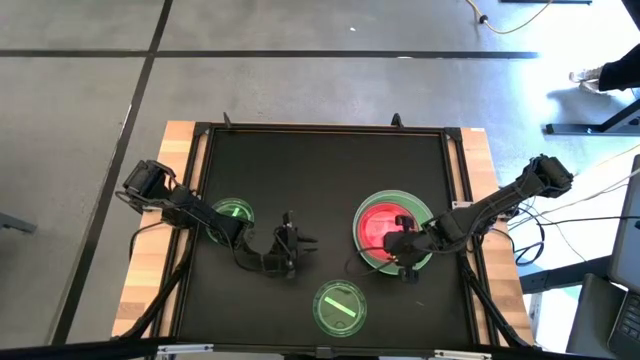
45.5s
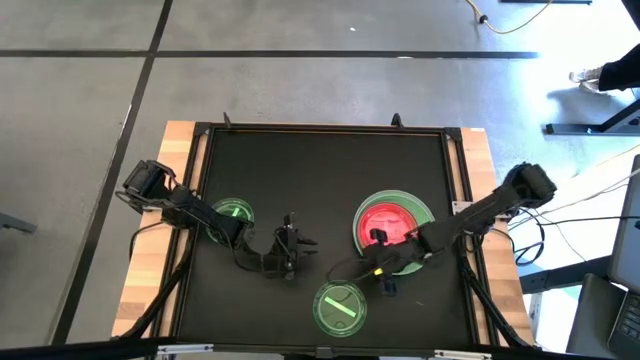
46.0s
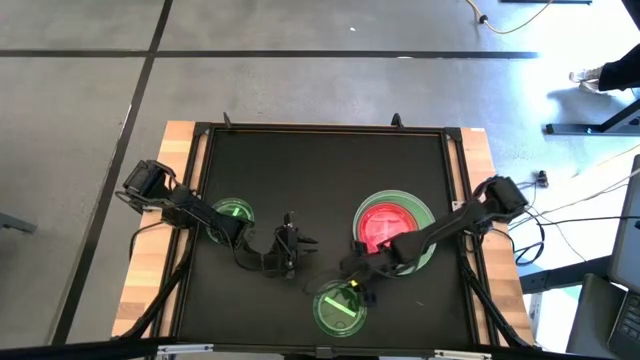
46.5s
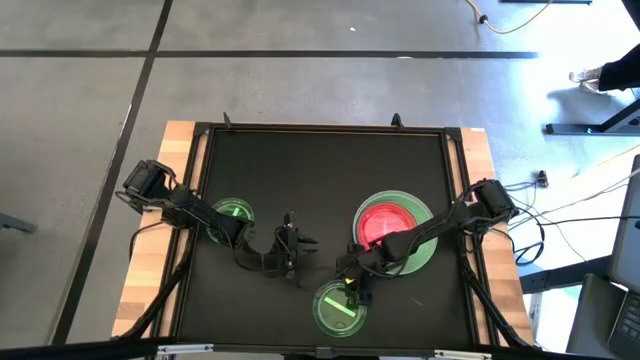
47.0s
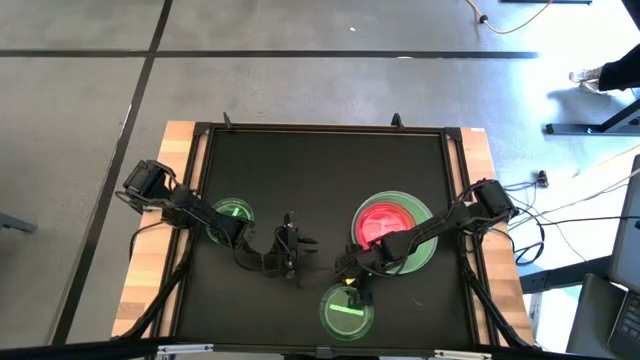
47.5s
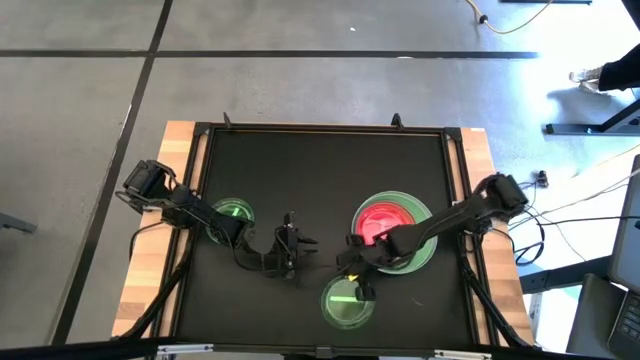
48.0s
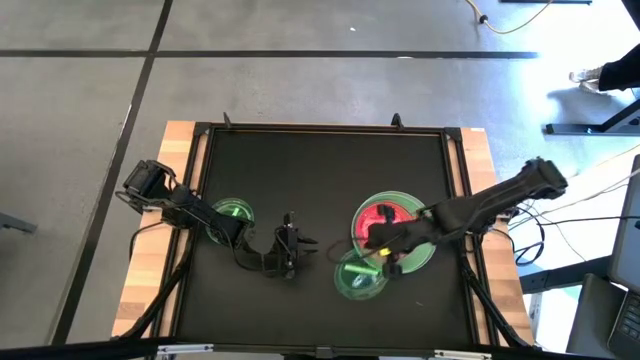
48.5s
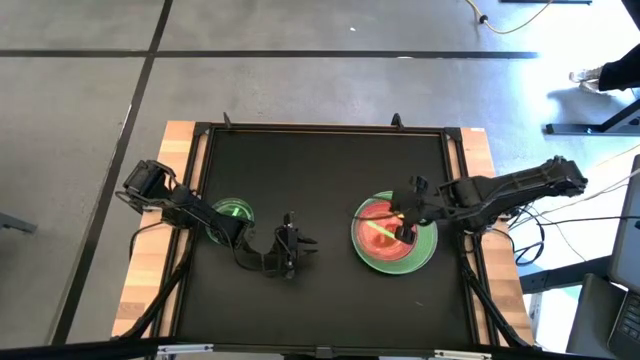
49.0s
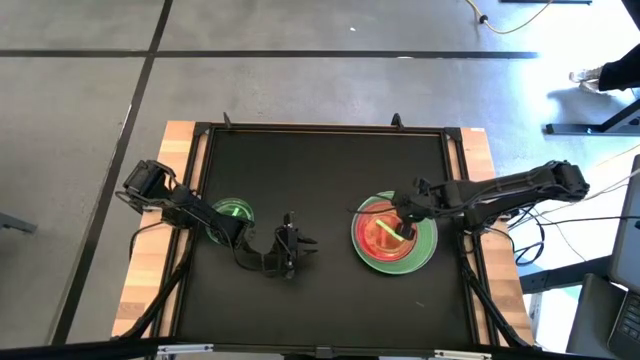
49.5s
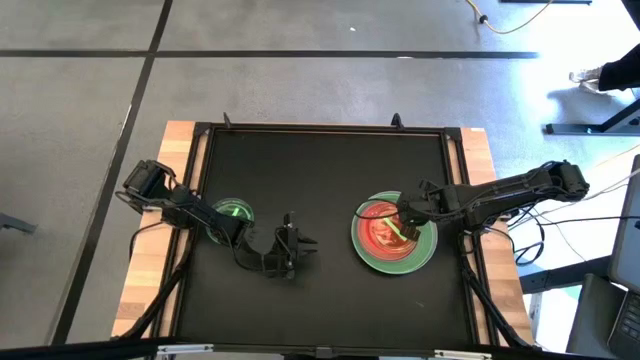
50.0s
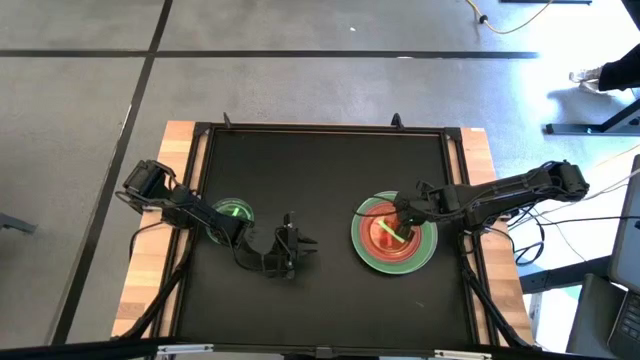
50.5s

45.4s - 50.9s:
Task: Stack plastic plates
Stack the bottom green transparent plate on top of the red transparent plate

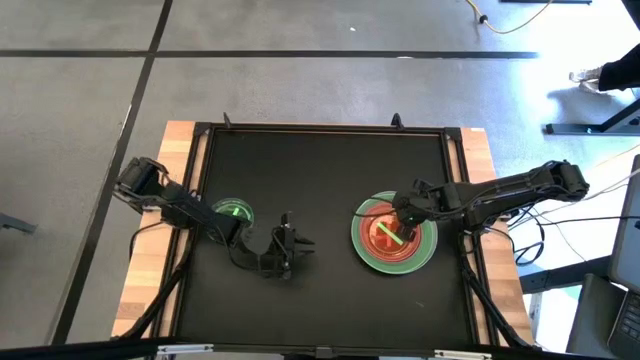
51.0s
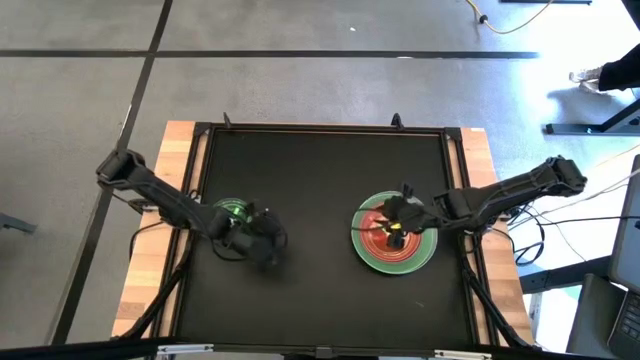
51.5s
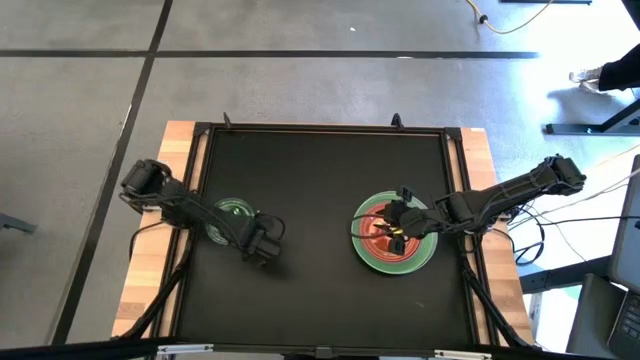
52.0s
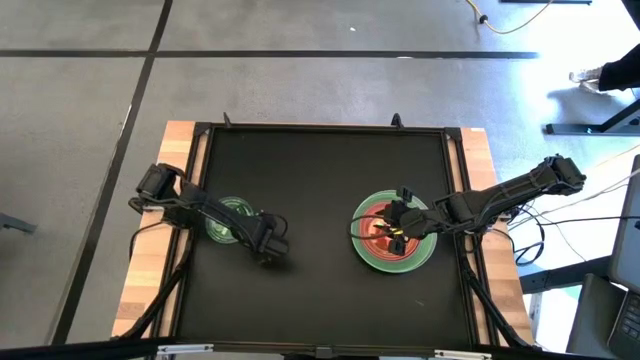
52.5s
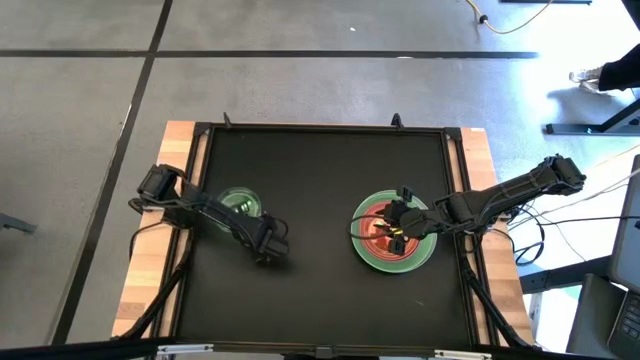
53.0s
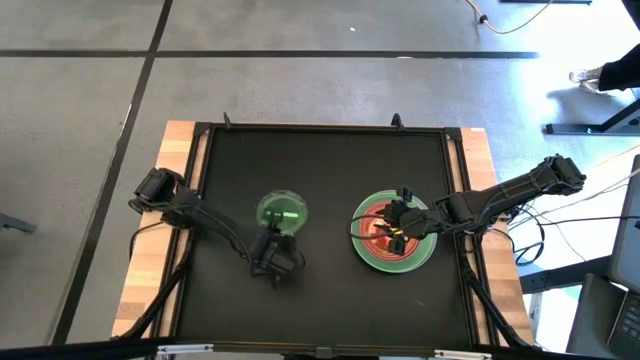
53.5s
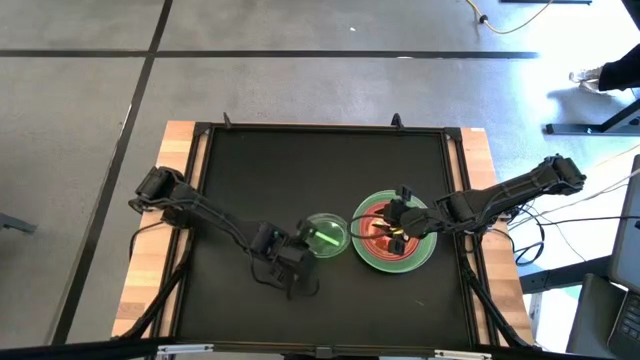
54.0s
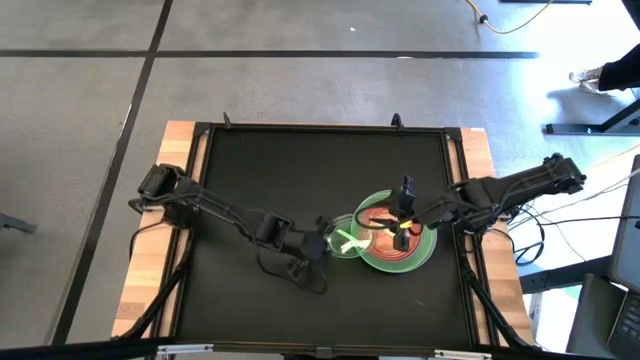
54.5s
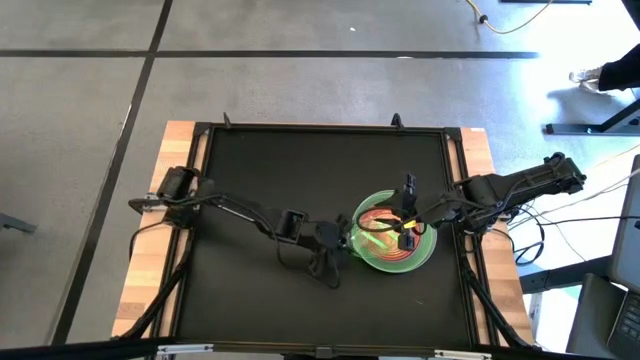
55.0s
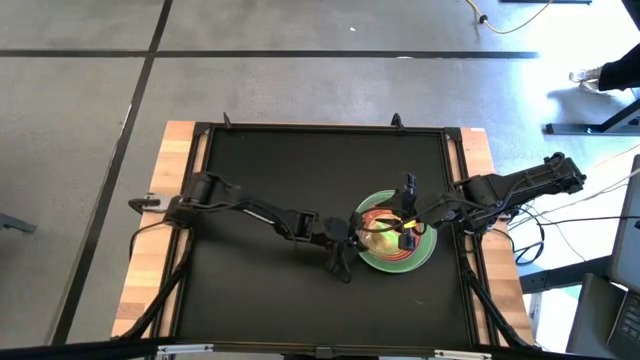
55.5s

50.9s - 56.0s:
Stack the green transparent plate on top of the green transparent plate

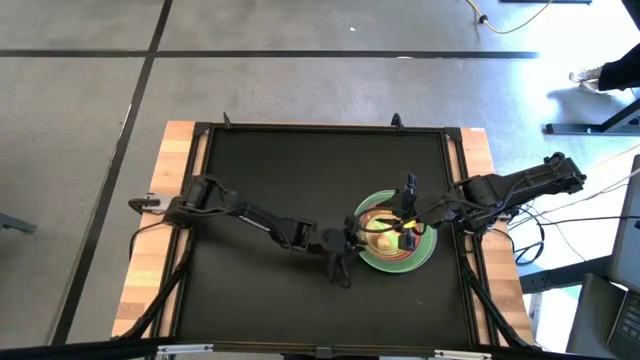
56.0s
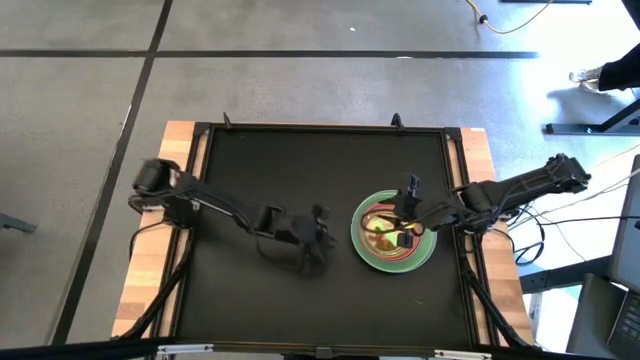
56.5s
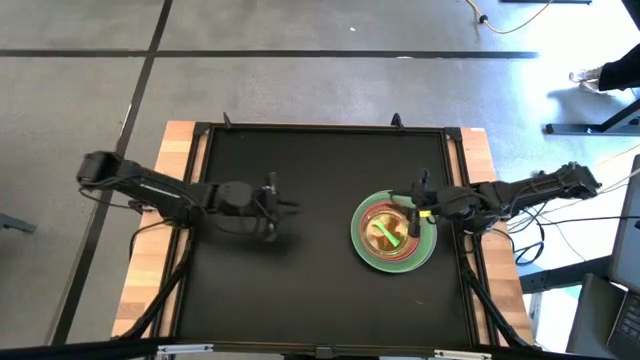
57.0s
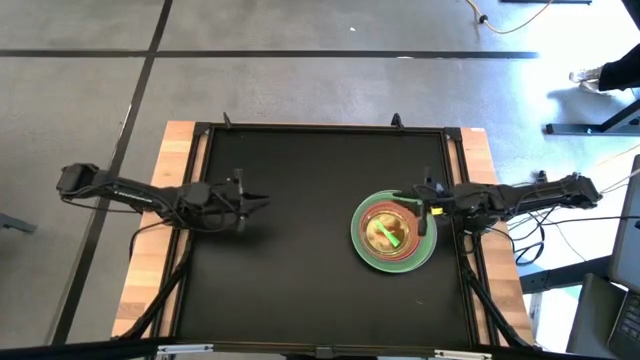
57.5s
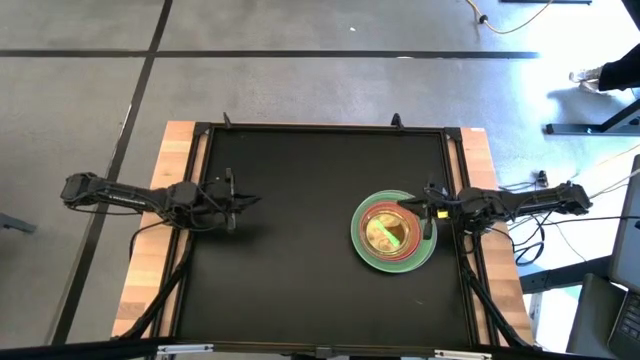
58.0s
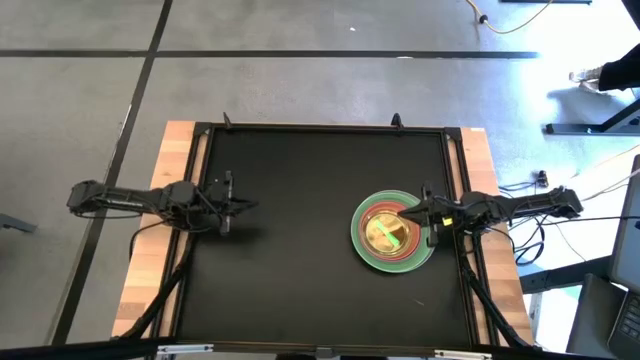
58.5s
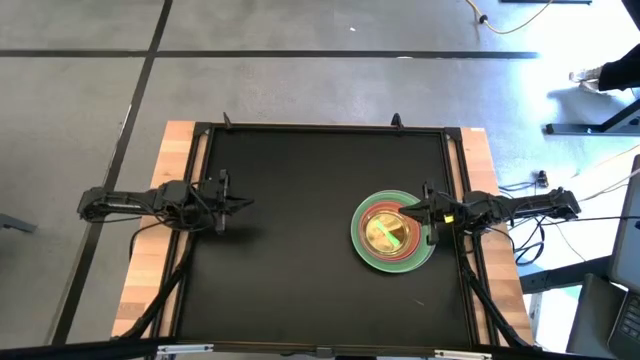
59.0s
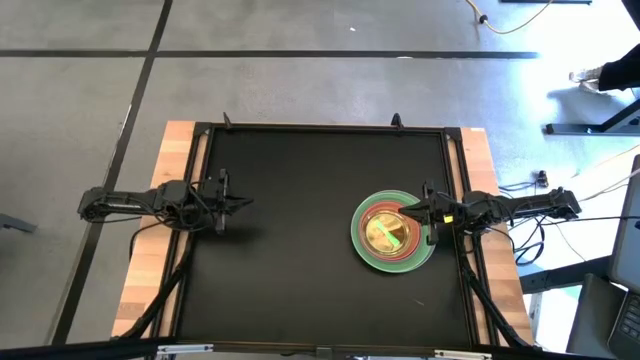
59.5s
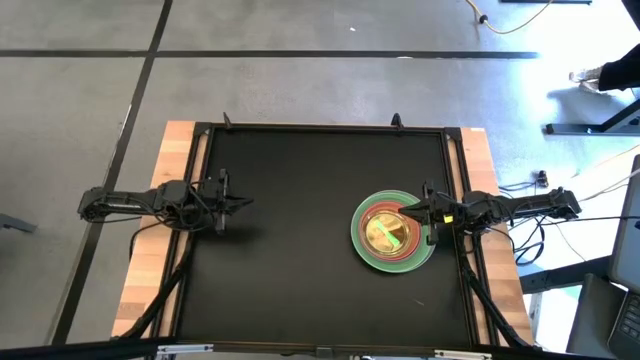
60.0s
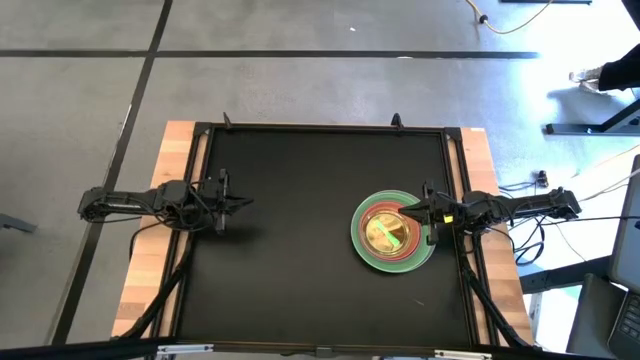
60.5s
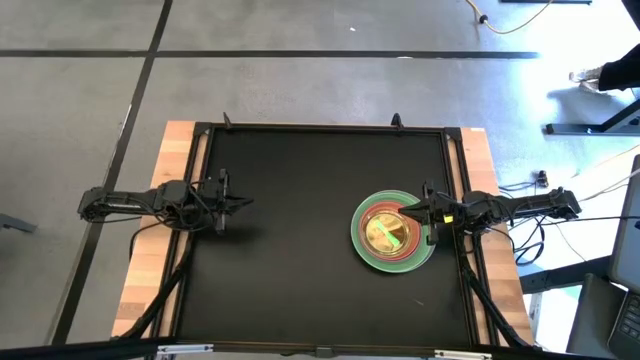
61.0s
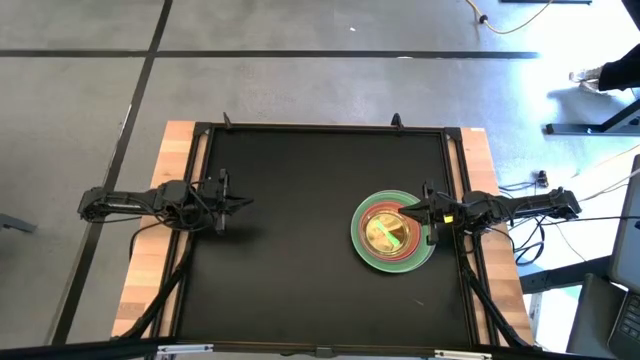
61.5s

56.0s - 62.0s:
Return to Home Position

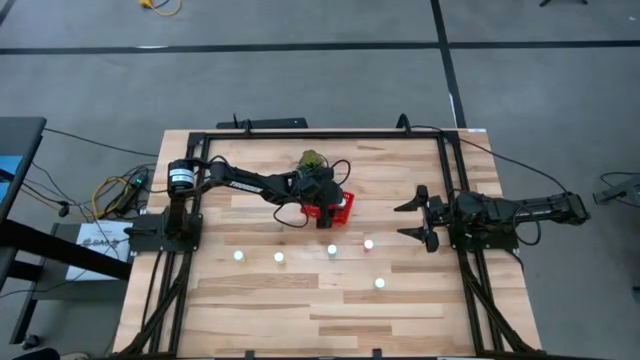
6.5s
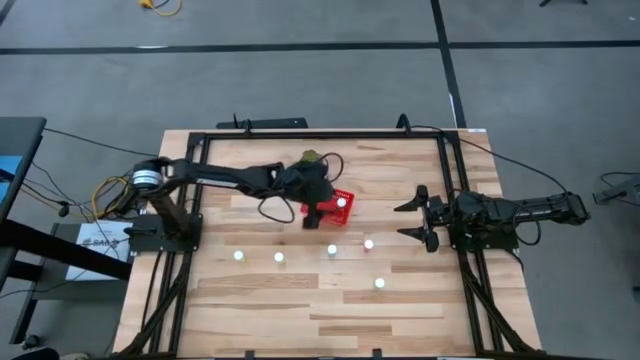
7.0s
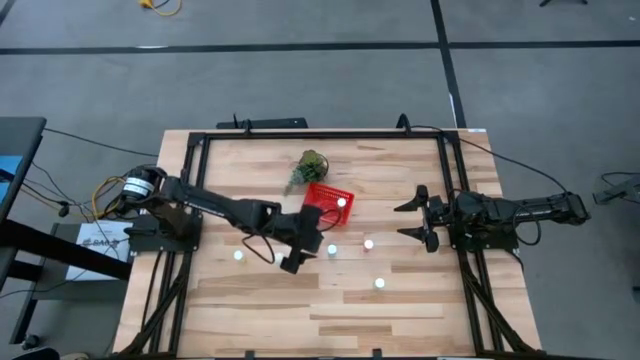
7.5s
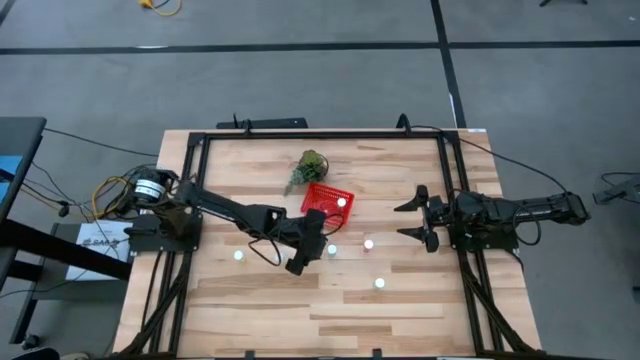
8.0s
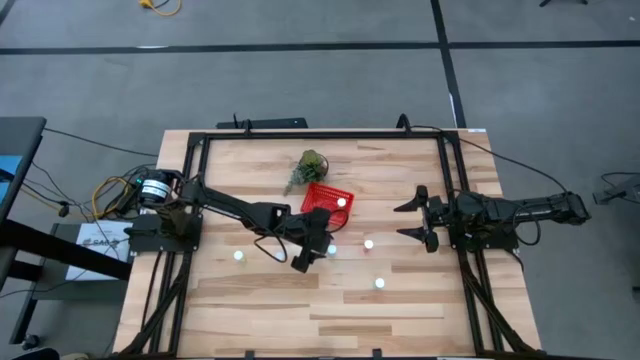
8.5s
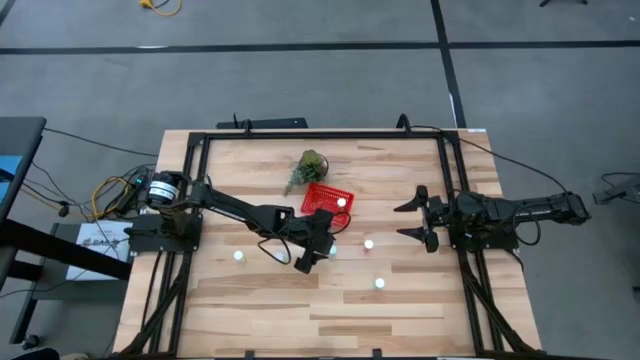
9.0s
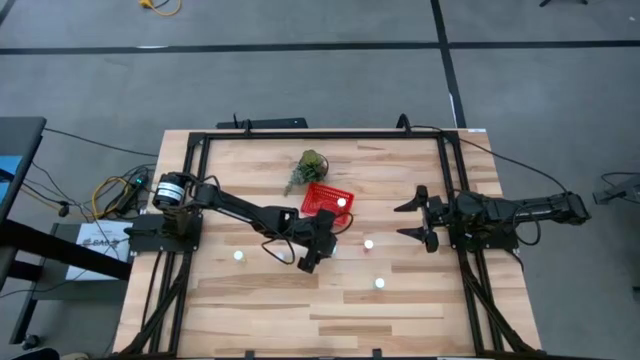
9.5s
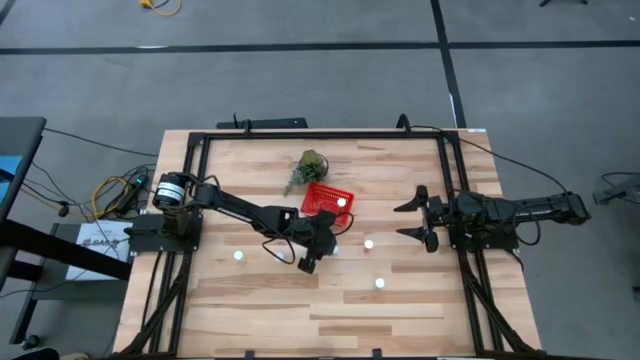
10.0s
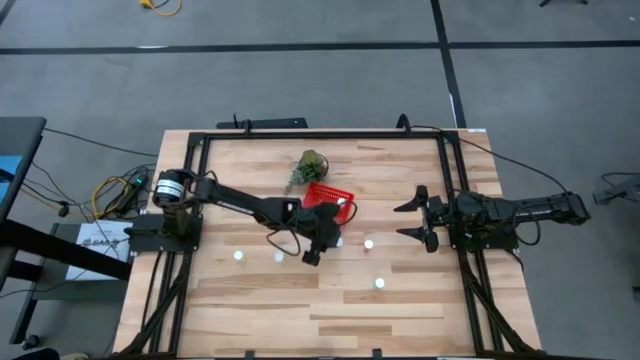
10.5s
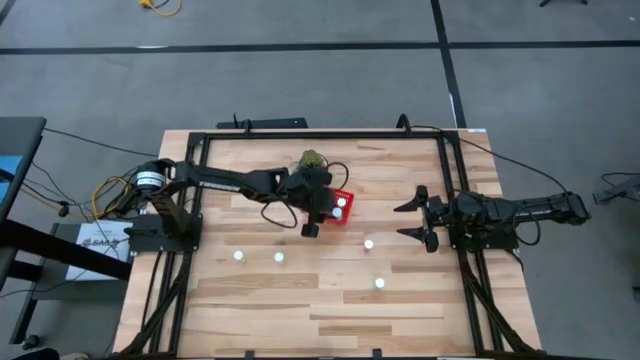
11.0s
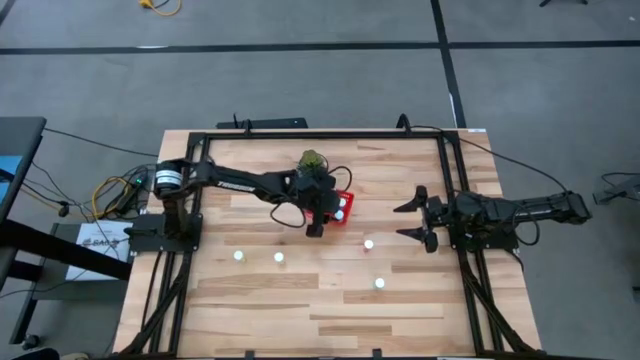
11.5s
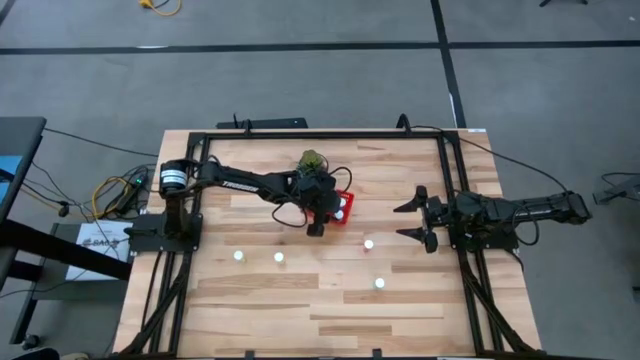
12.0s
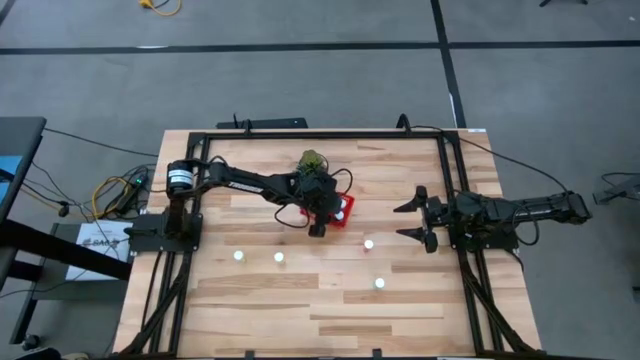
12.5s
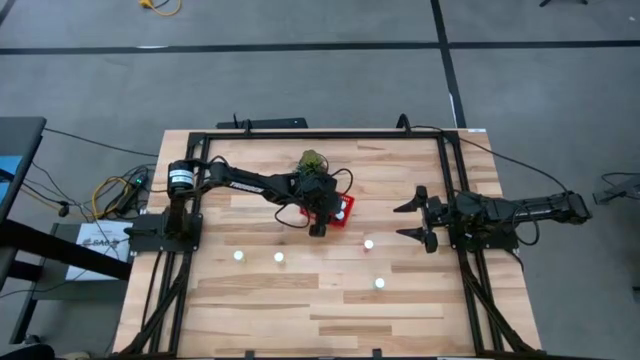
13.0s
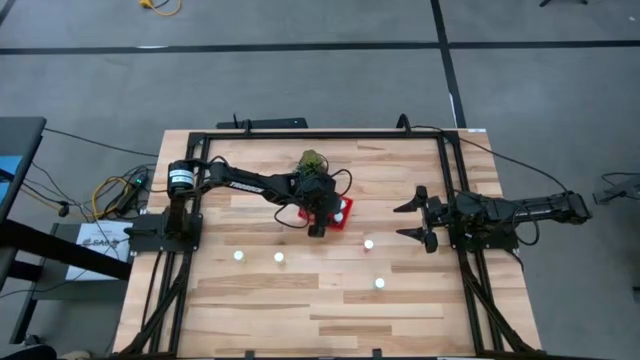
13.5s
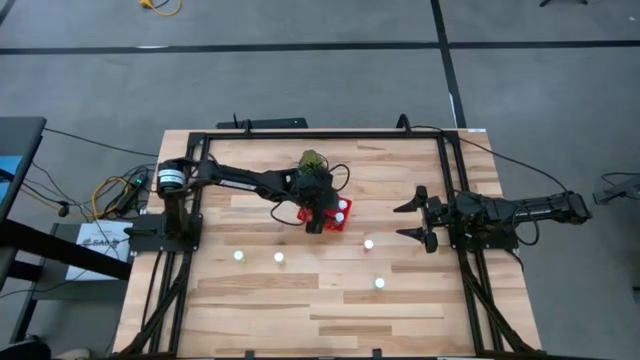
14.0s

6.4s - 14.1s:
Task: Pick and place pill bottles into a basket
Put the top blue medicine bottle into the red bin
